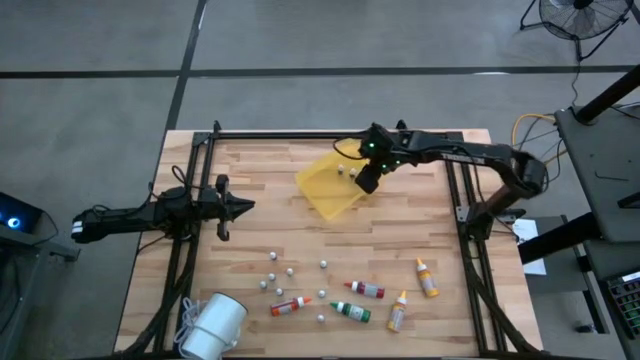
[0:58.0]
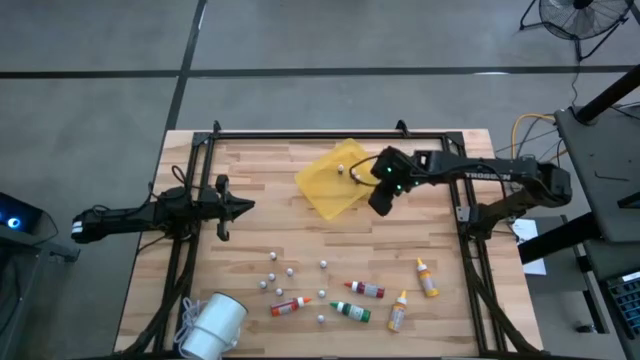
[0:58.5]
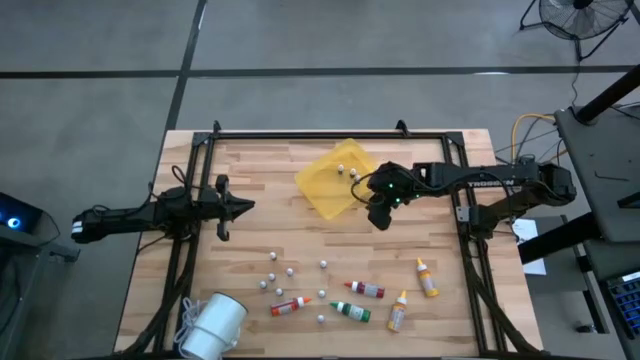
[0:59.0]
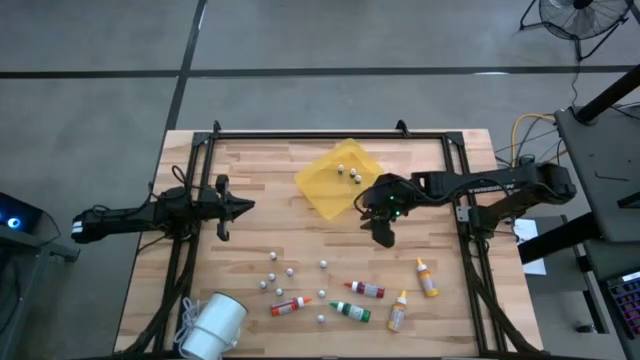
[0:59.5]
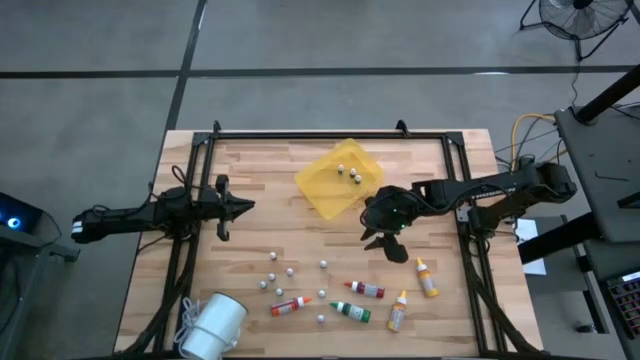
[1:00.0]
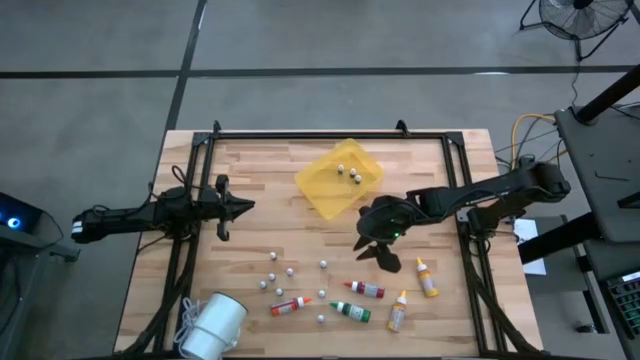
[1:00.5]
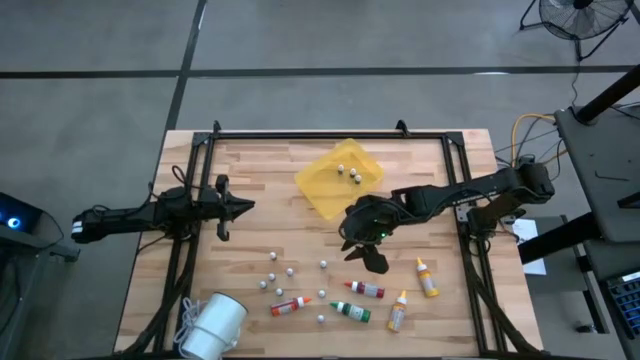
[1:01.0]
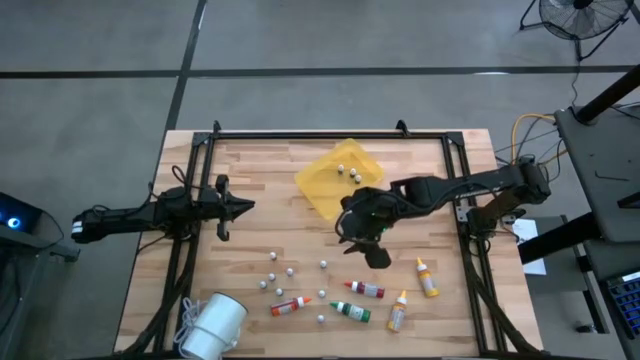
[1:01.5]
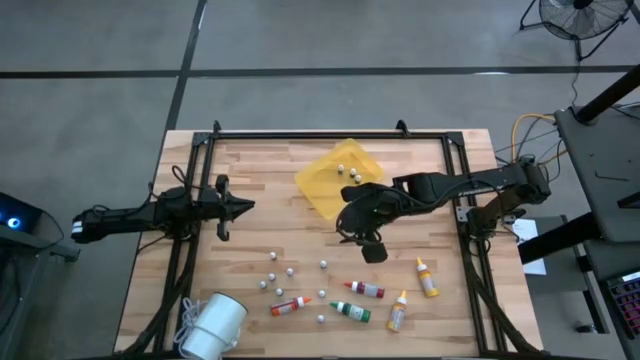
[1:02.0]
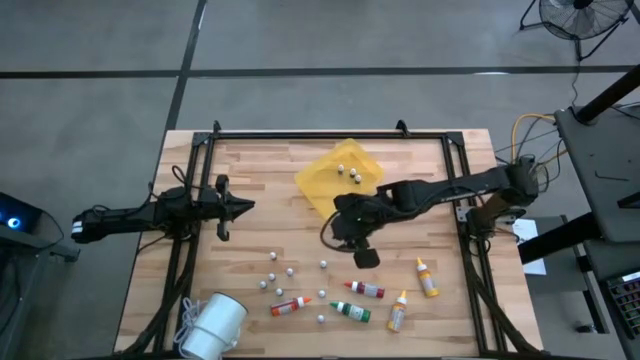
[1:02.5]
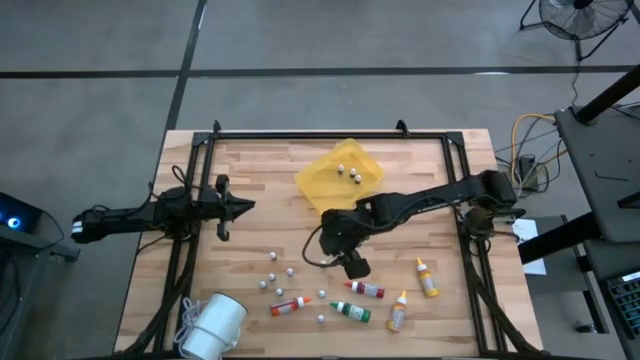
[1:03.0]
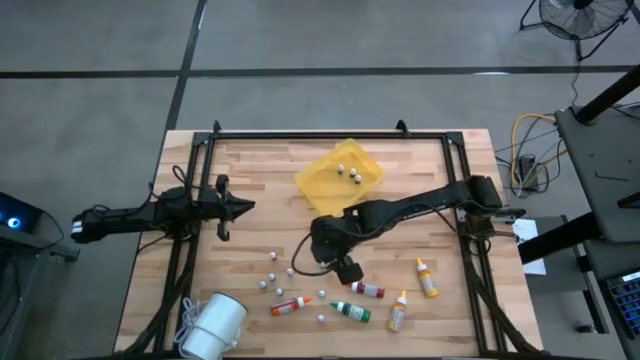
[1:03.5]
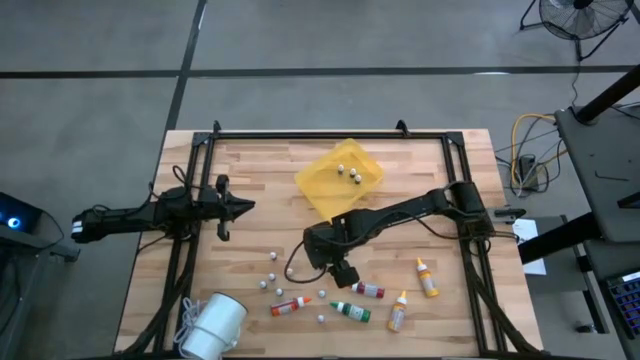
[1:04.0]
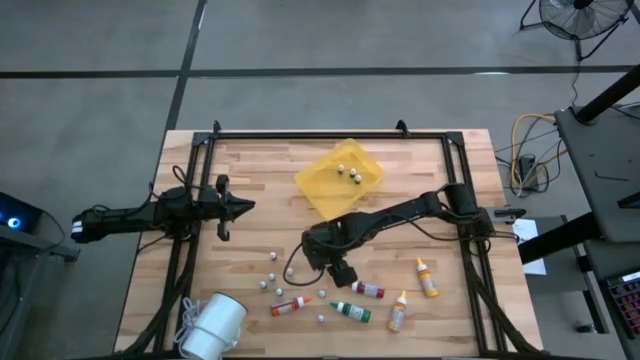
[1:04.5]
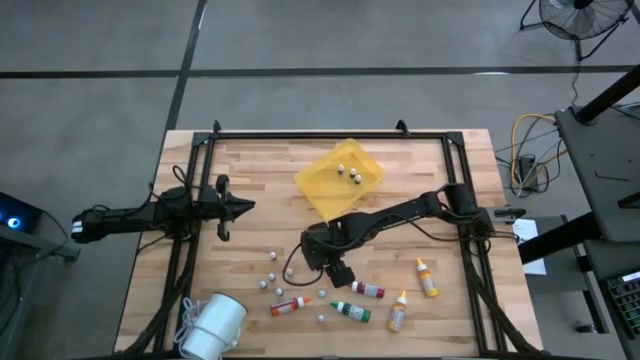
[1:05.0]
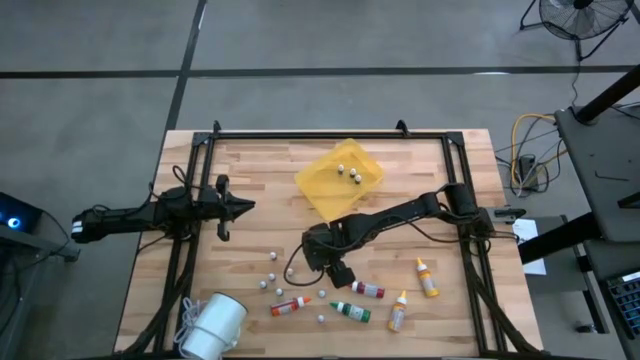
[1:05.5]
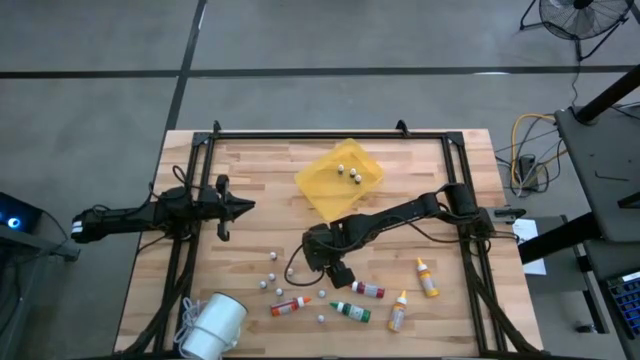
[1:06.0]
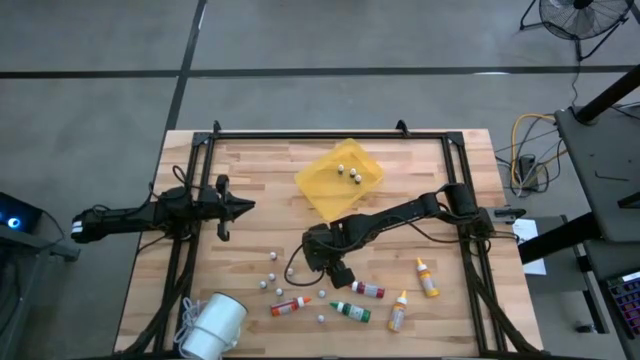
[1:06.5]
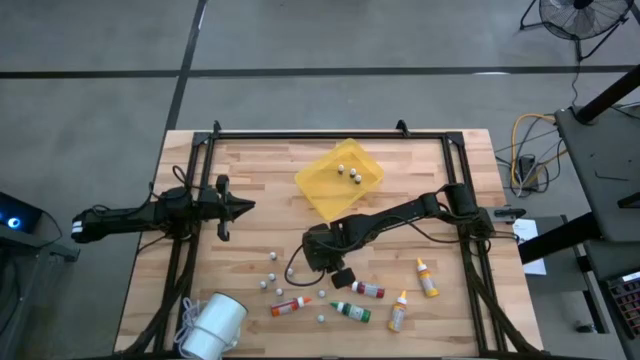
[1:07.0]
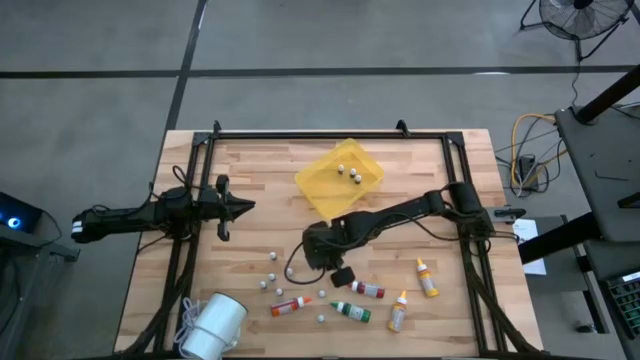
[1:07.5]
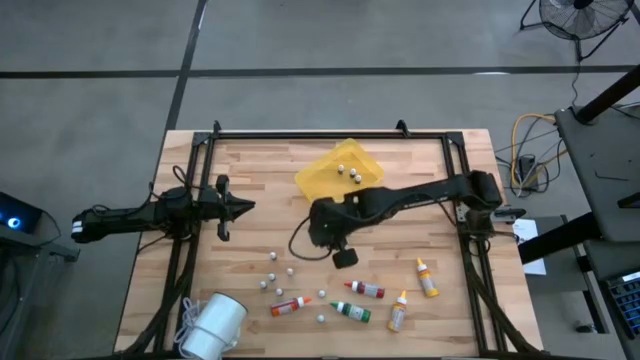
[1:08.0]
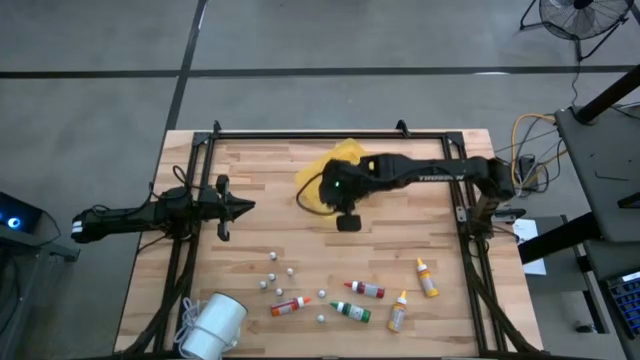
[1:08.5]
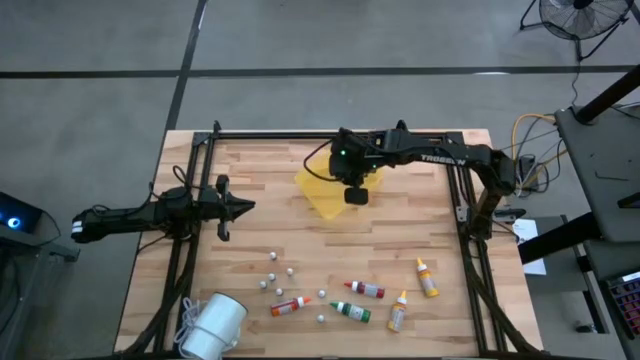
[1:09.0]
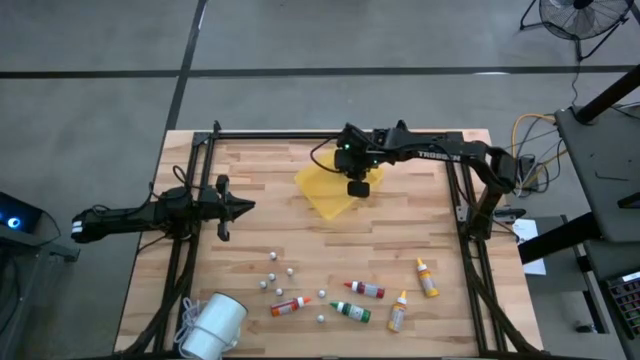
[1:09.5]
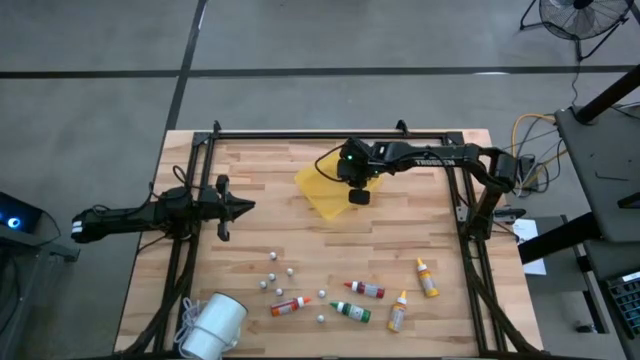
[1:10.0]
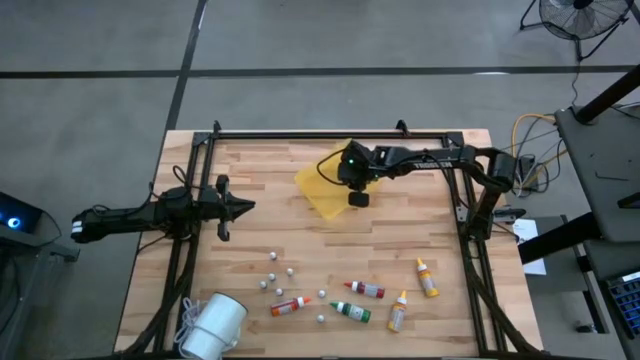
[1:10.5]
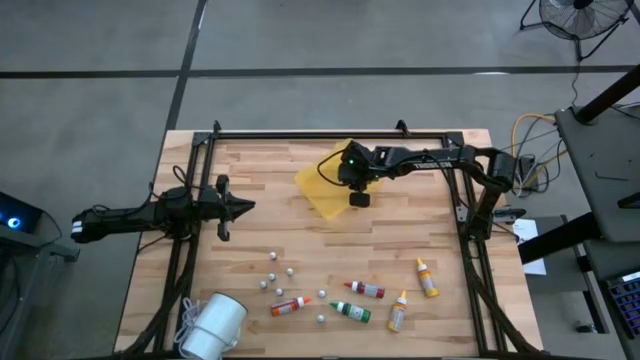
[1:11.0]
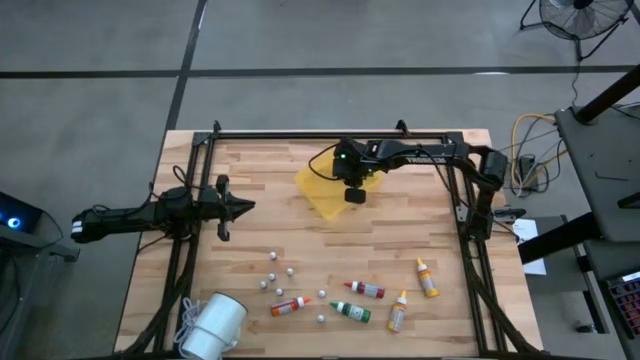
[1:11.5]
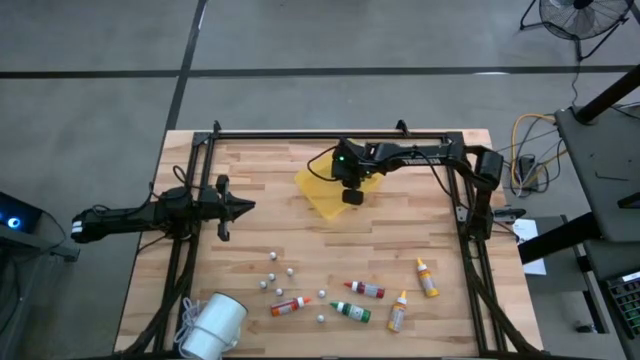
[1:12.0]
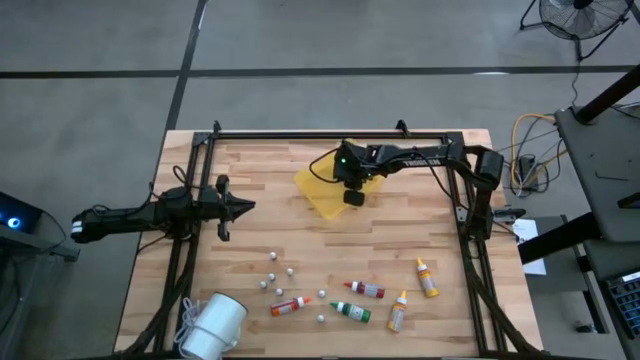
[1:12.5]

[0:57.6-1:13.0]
Task: Pick & Place food coloring
Put the small green food coloring bottle into the yellow bin
